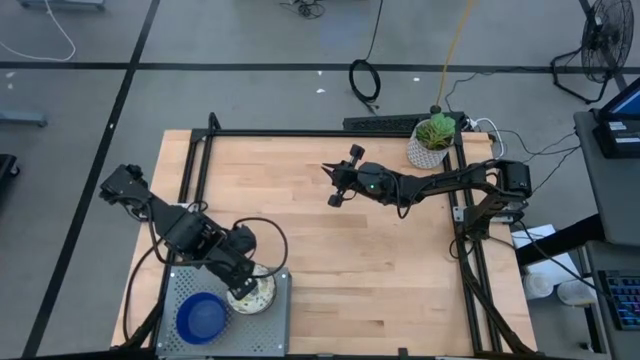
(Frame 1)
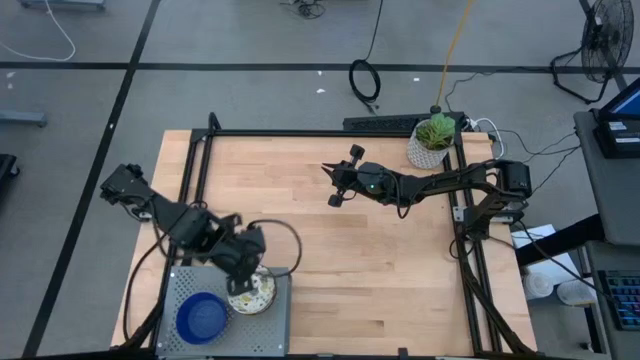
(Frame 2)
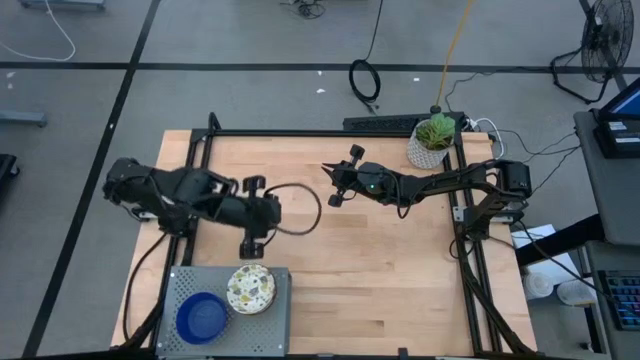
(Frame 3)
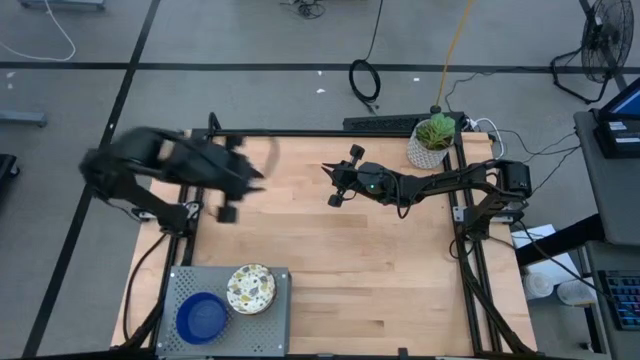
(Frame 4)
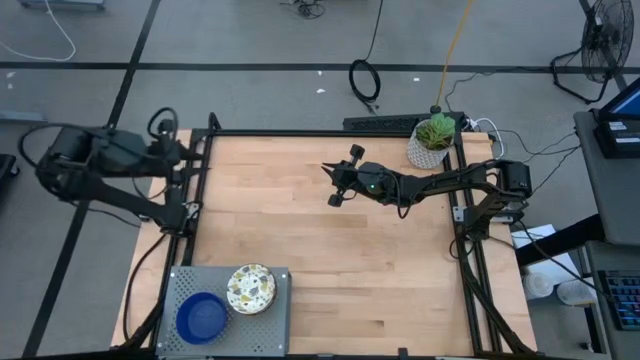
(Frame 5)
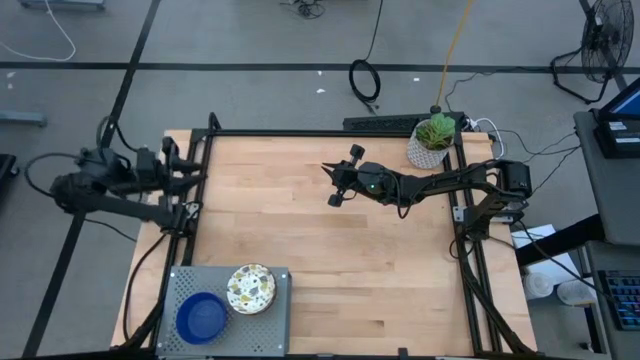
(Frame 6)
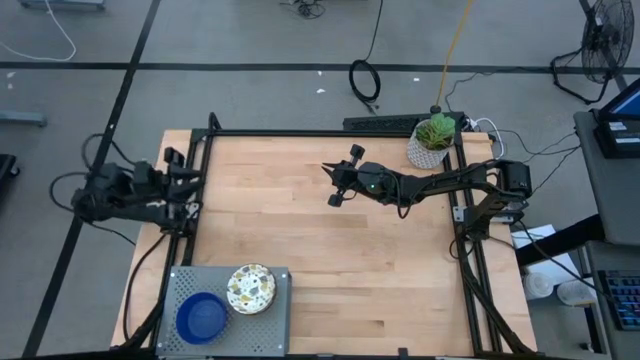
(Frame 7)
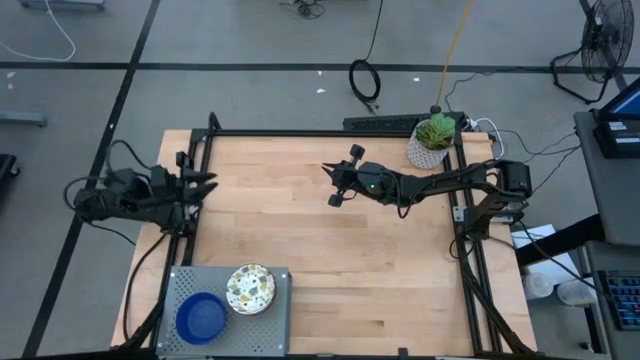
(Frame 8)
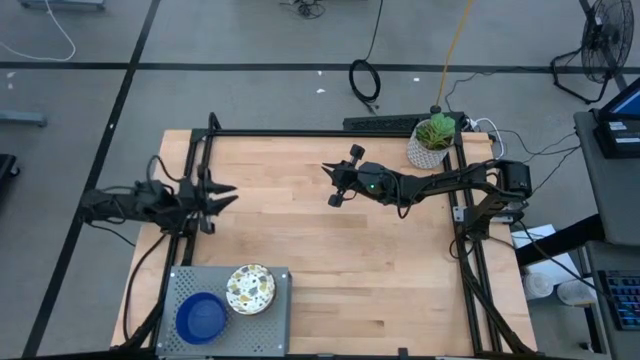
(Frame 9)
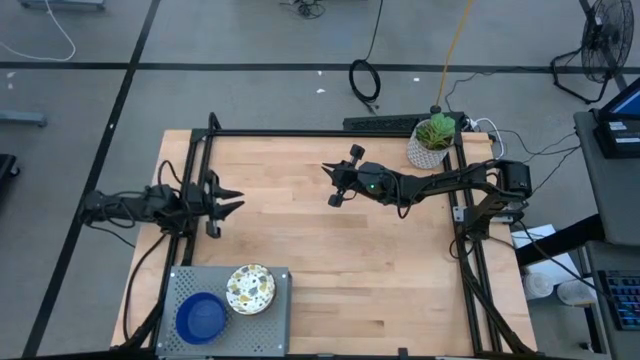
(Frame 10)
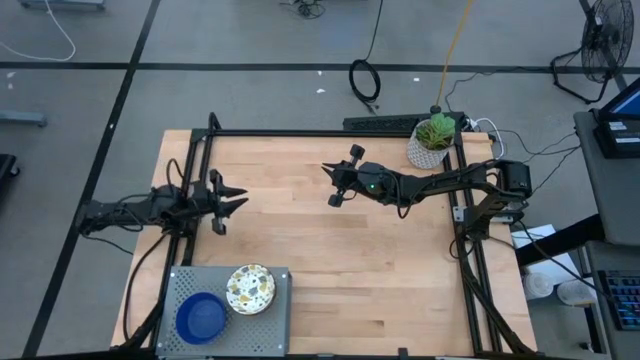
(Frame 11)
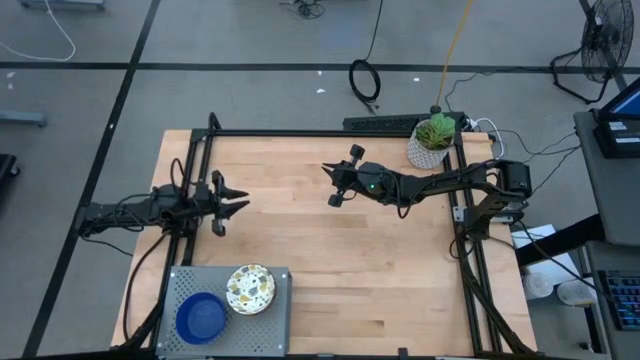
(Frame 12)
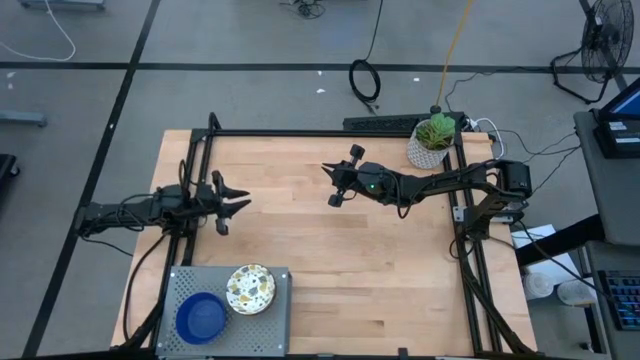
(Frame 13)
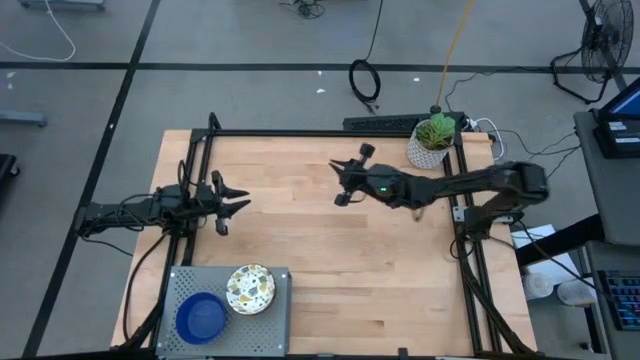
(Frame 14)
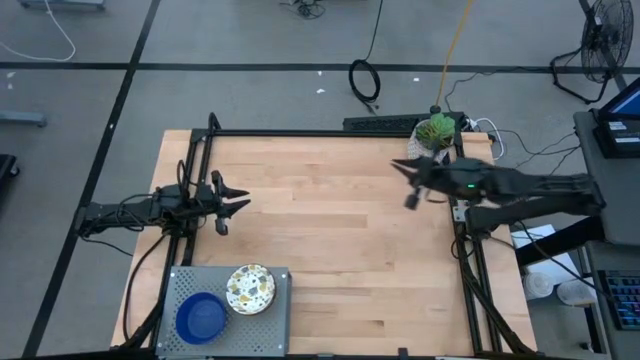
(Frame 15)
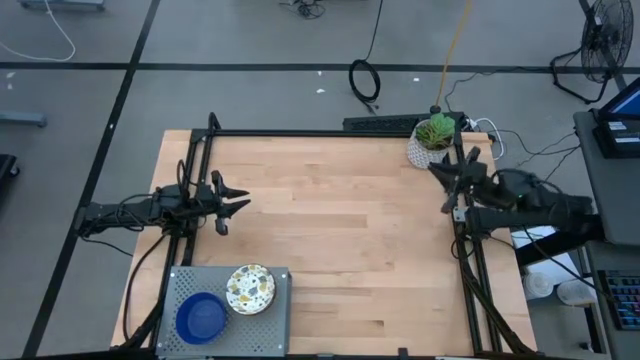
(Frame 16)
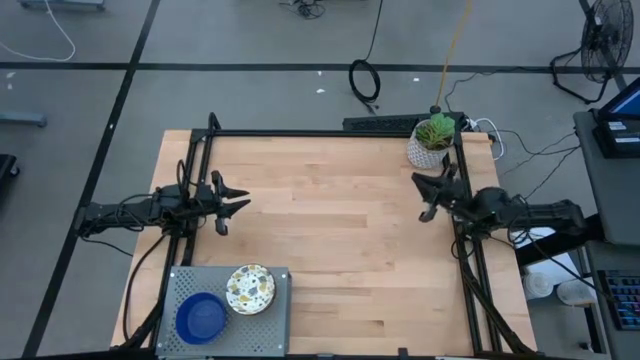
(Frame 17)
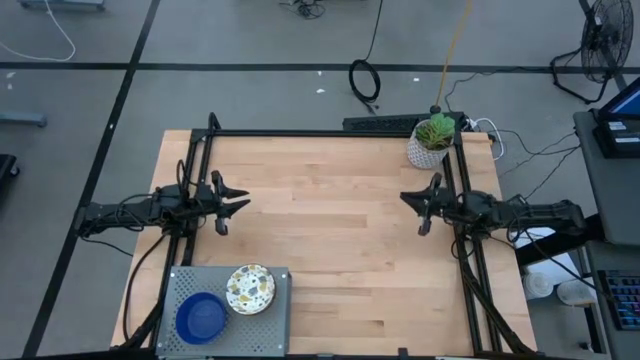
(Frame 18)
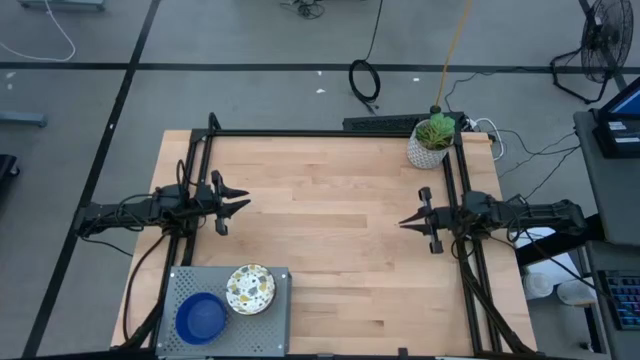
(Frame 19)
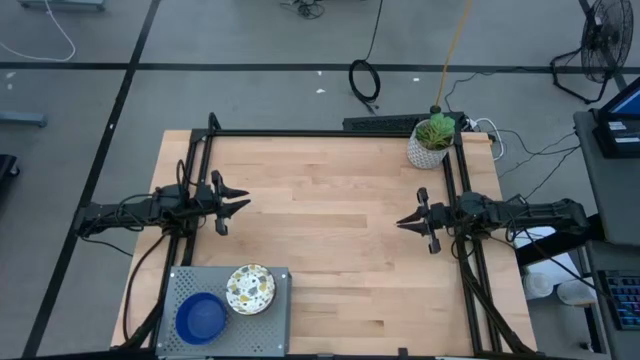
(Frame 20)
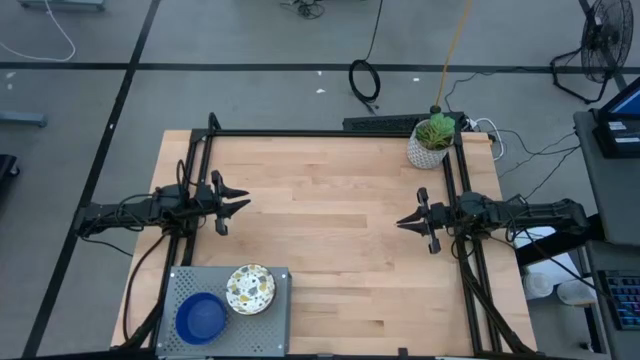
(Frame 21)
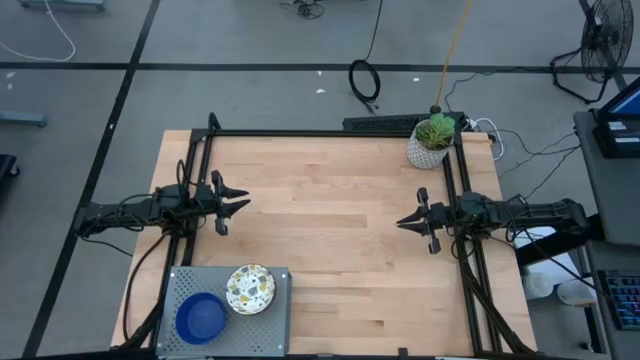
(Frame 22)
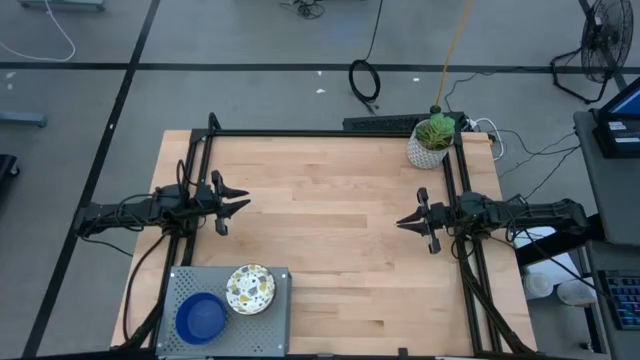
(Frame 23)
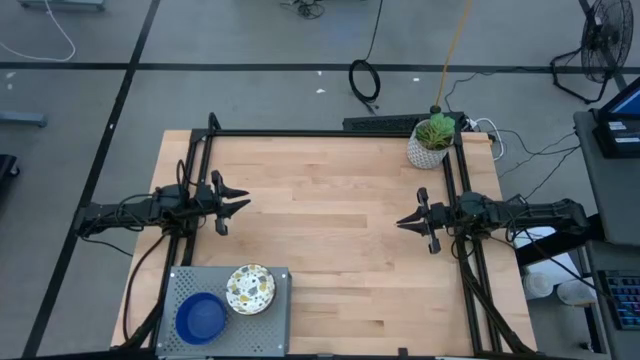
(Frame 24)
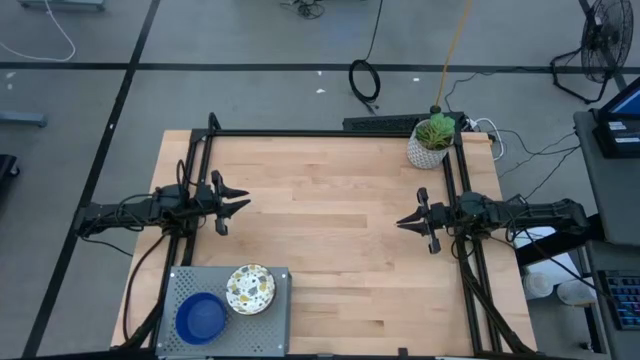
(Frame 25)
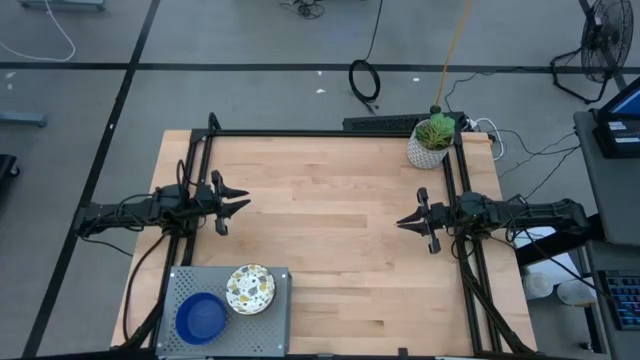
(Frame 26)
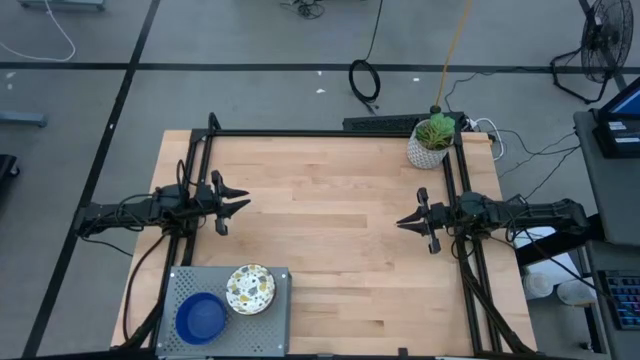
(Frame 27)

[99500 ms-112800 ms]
Task: Pick & Place Mini bowls
Return to Home Position

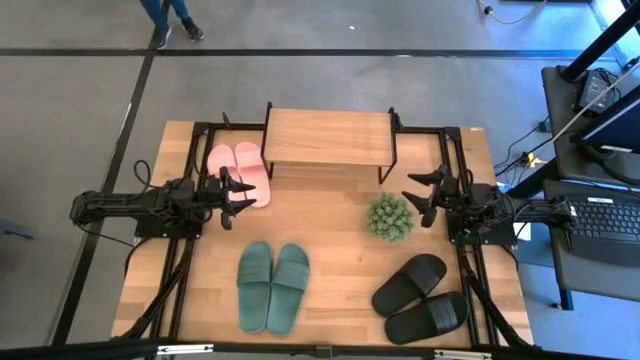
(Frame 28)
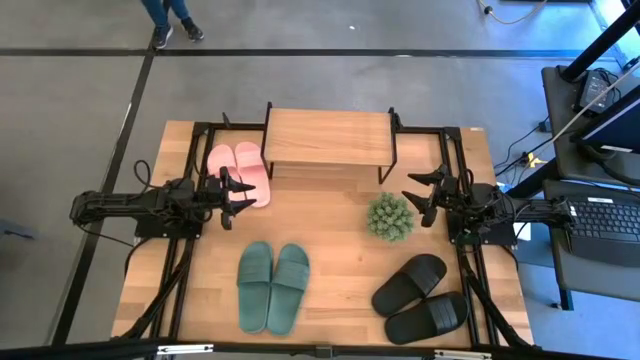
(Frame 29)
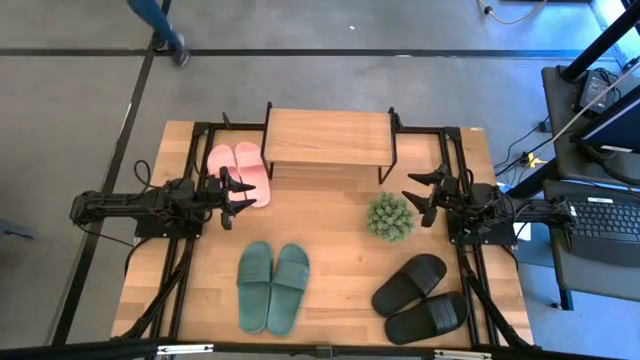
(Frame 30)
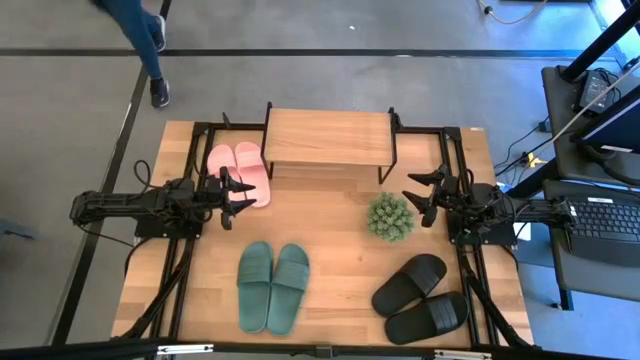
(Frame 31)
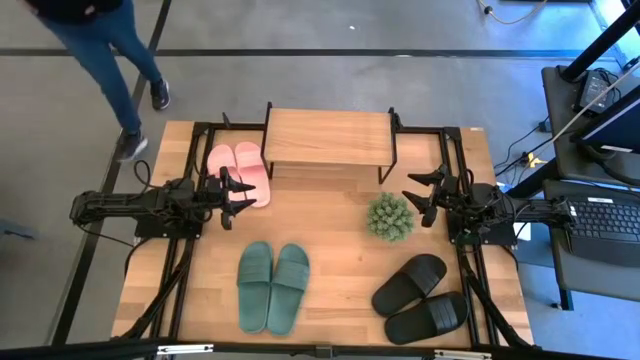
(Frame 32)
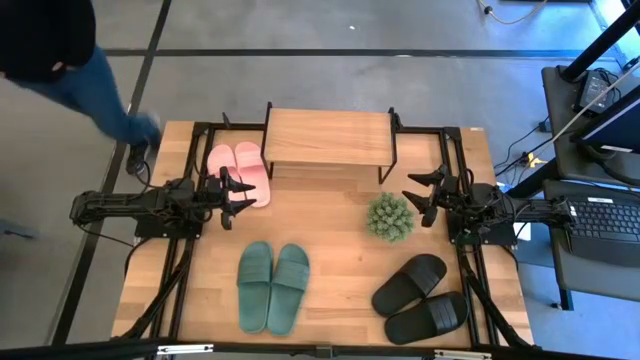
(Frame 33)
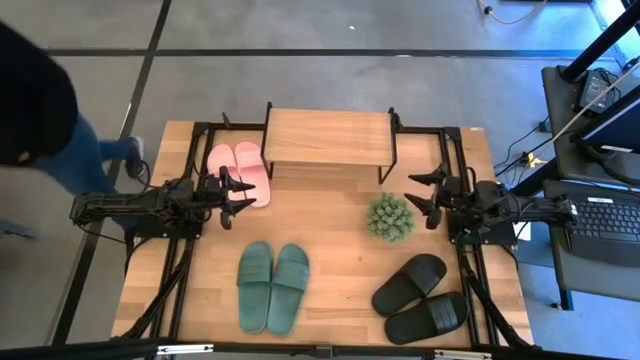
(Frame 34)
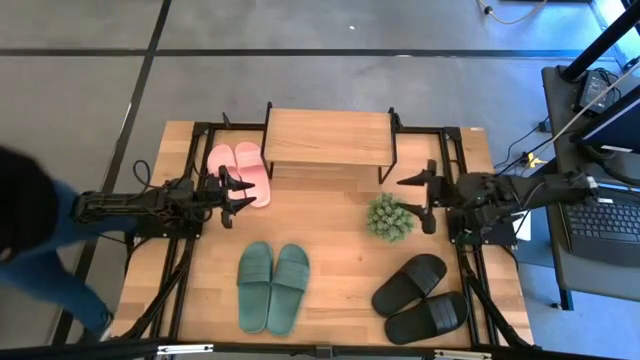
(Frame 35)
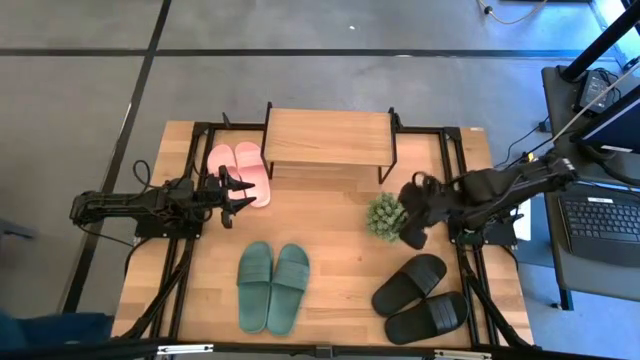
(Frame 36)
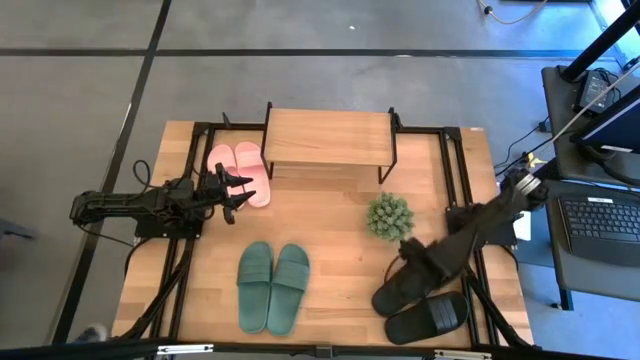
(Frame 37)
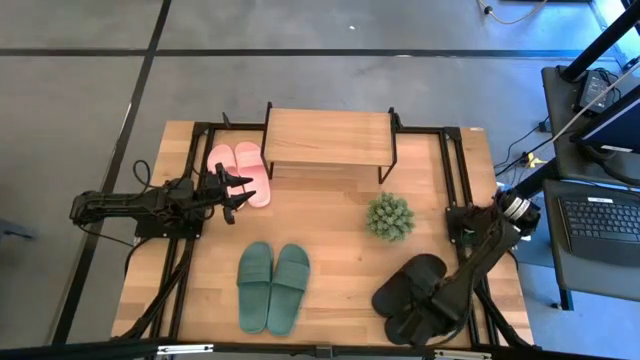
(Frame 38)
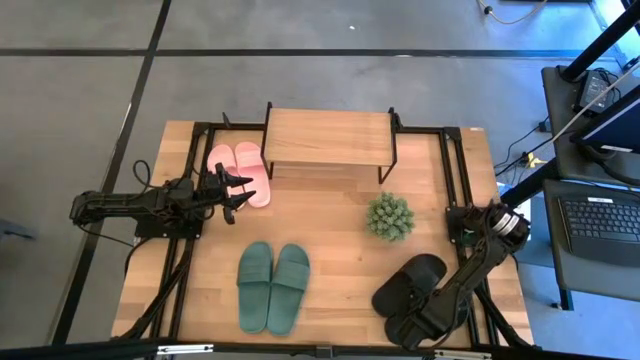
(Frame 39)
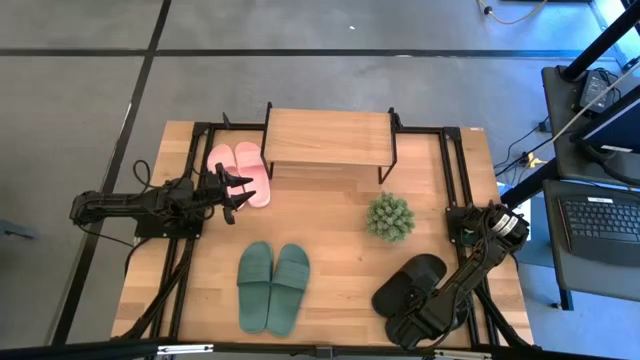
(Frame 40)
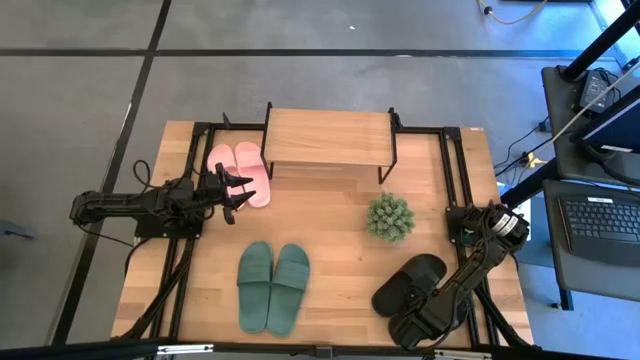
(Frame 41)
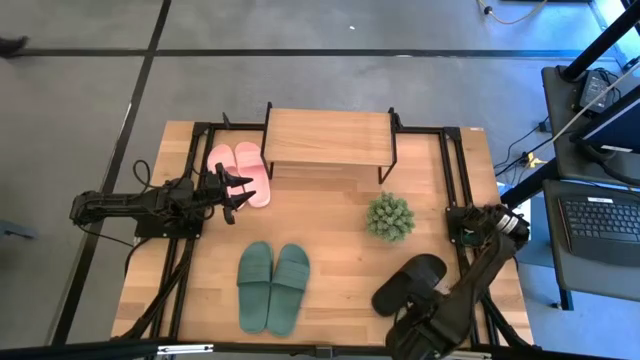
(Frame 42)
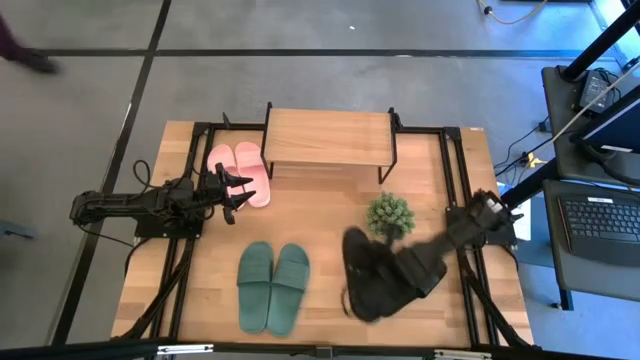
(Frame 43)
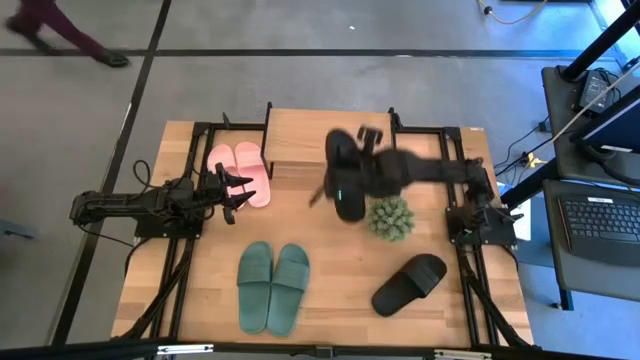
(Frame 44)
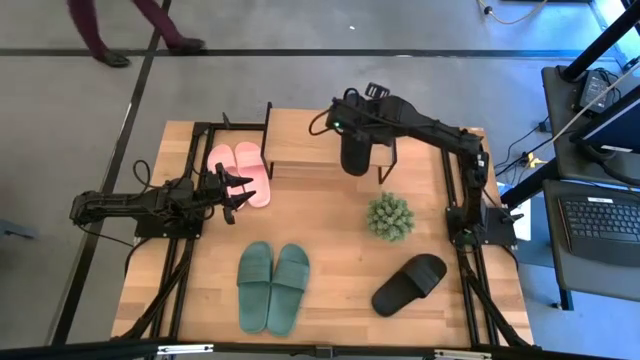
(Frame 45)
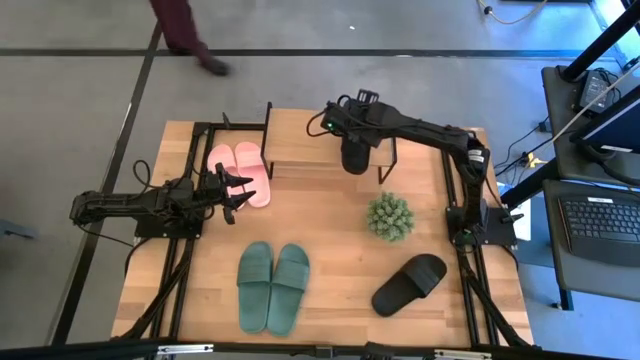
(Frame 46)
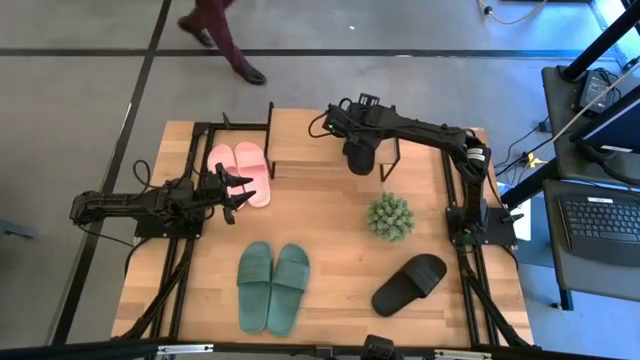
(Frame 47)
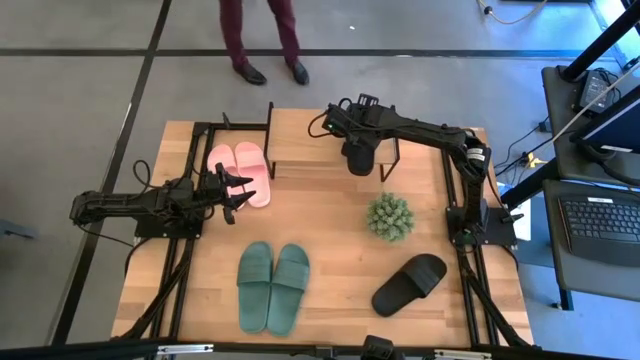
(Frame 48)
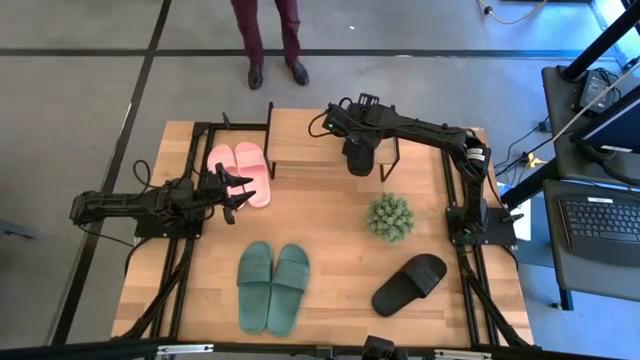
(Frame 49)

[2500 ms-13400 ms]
Task: Pick and place slides into the shelf
Put the bottom black slide on the shelf
